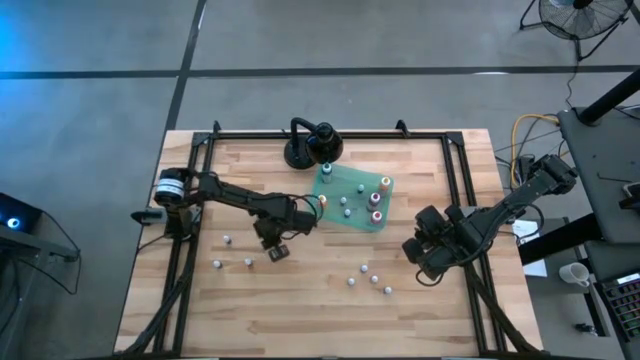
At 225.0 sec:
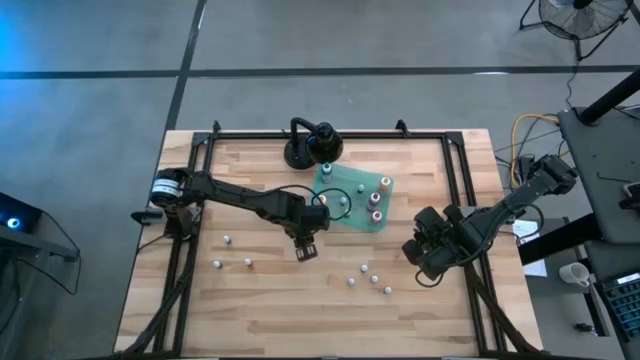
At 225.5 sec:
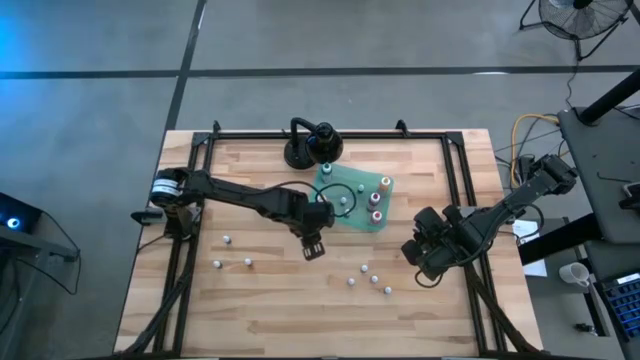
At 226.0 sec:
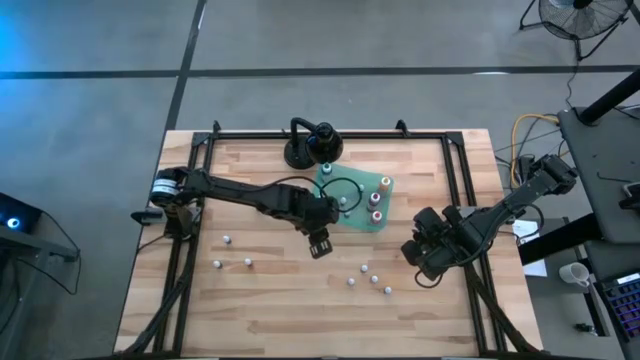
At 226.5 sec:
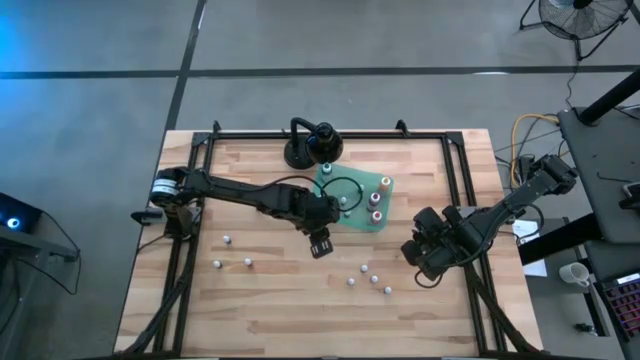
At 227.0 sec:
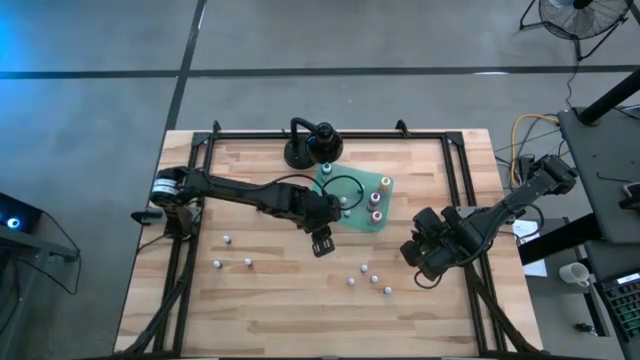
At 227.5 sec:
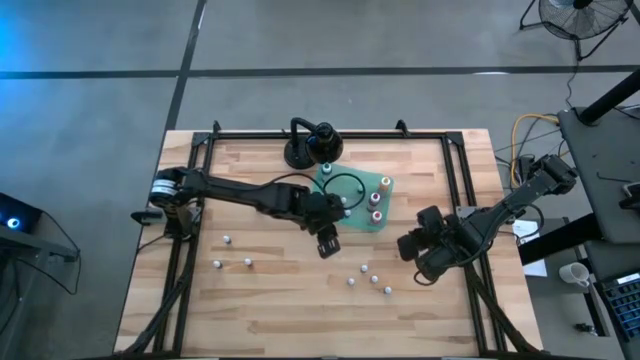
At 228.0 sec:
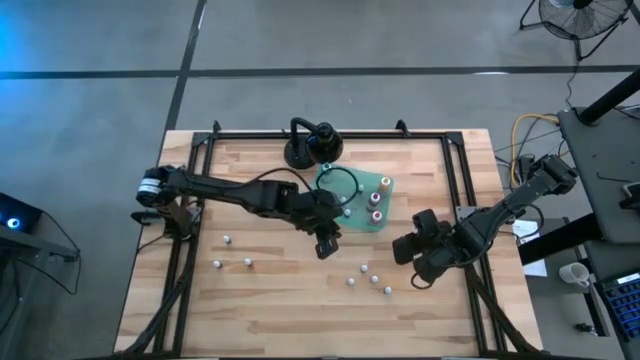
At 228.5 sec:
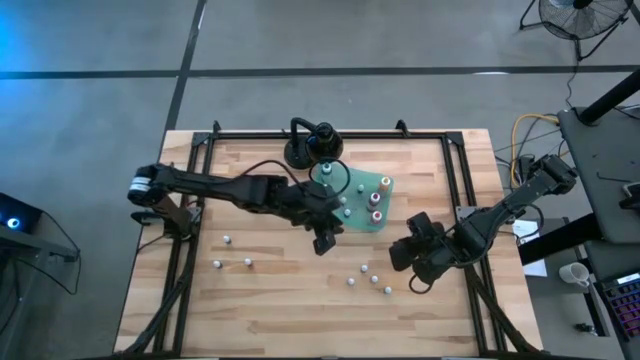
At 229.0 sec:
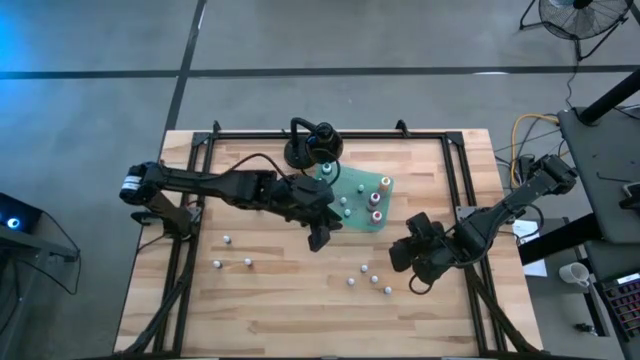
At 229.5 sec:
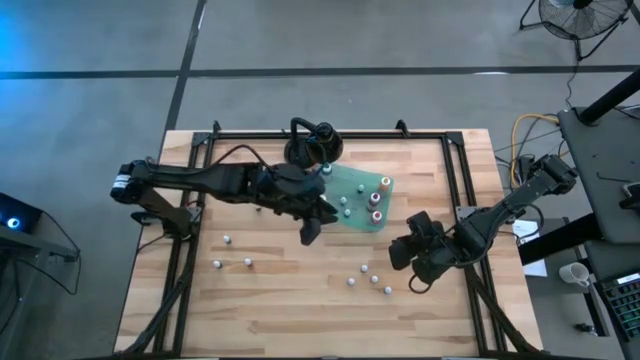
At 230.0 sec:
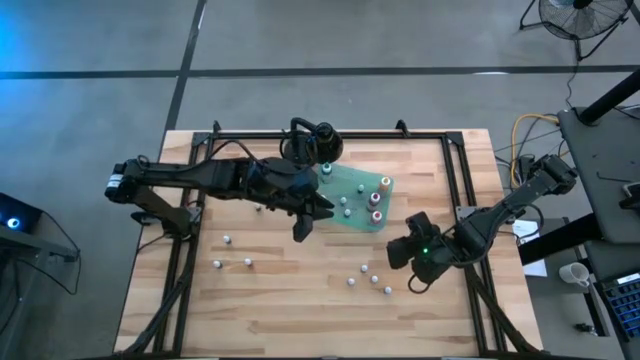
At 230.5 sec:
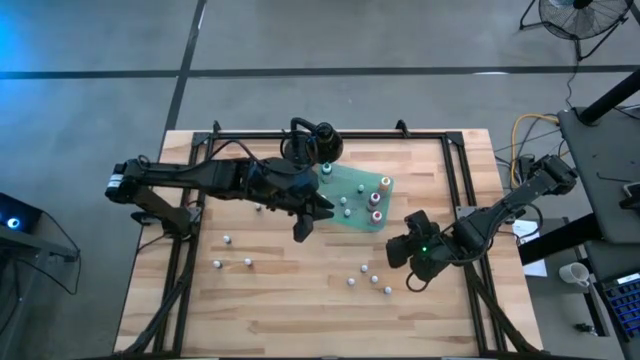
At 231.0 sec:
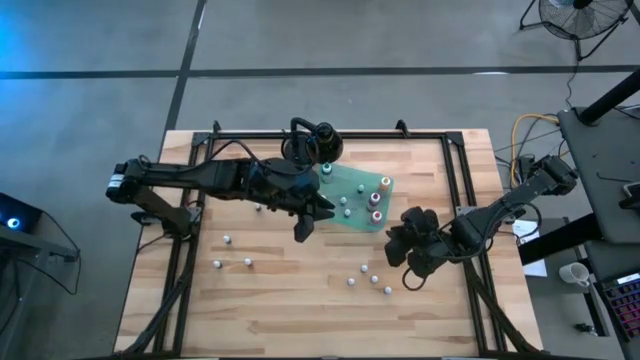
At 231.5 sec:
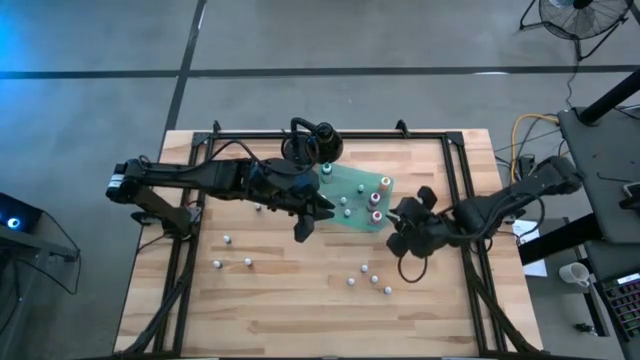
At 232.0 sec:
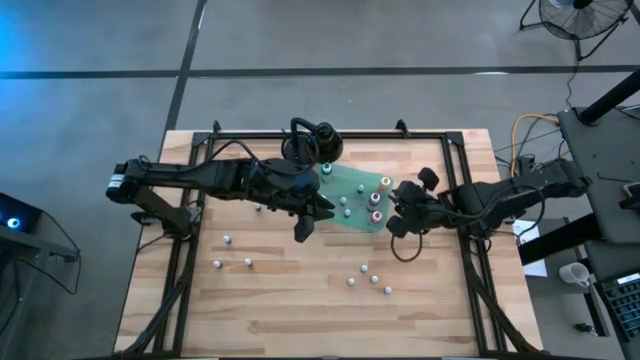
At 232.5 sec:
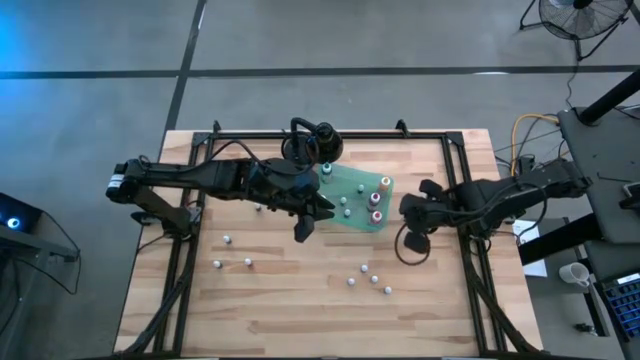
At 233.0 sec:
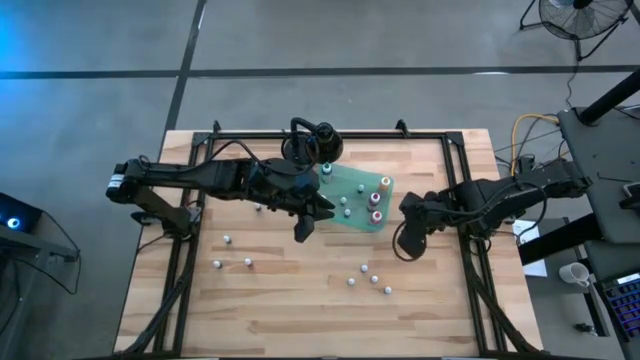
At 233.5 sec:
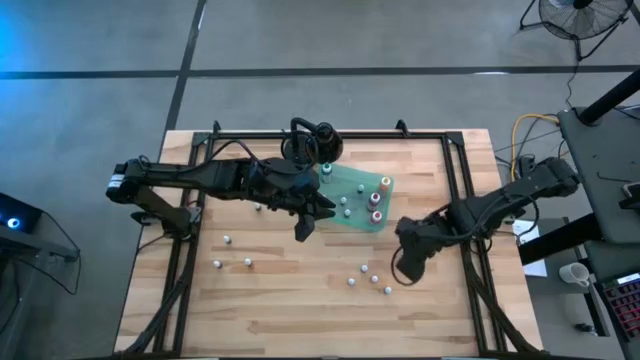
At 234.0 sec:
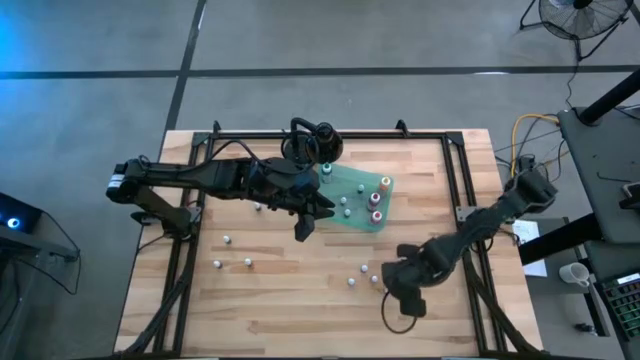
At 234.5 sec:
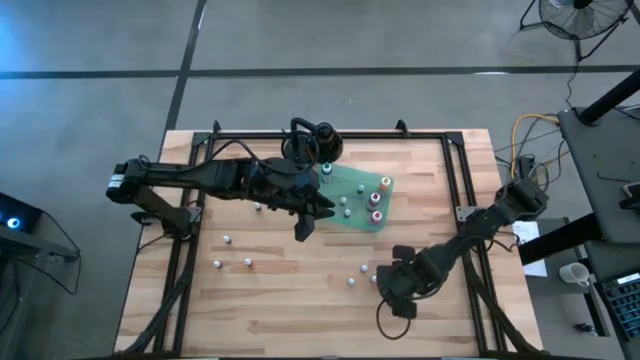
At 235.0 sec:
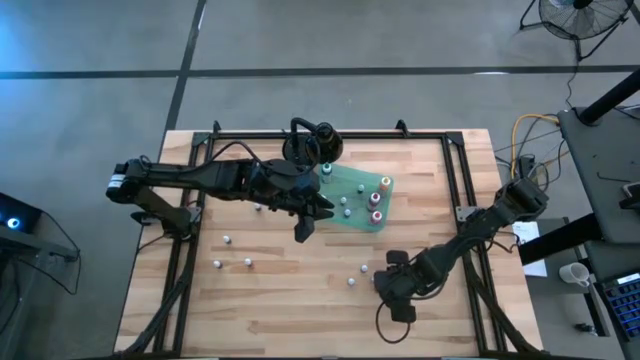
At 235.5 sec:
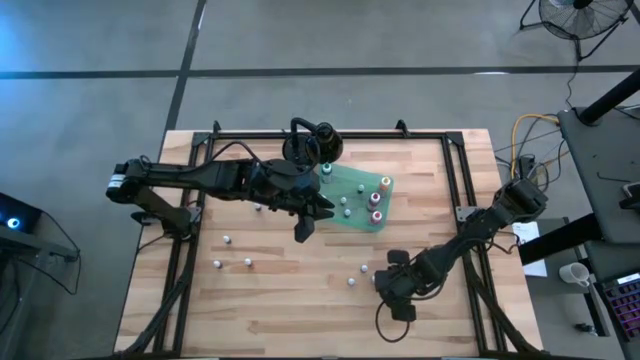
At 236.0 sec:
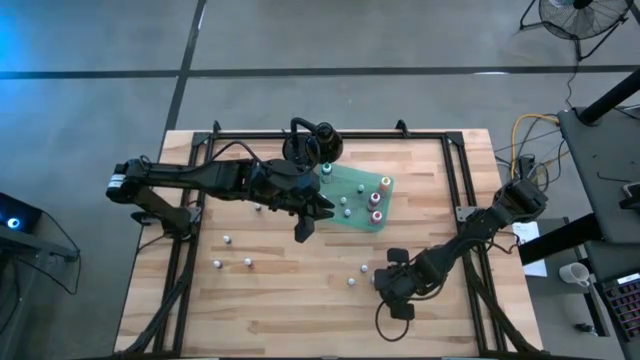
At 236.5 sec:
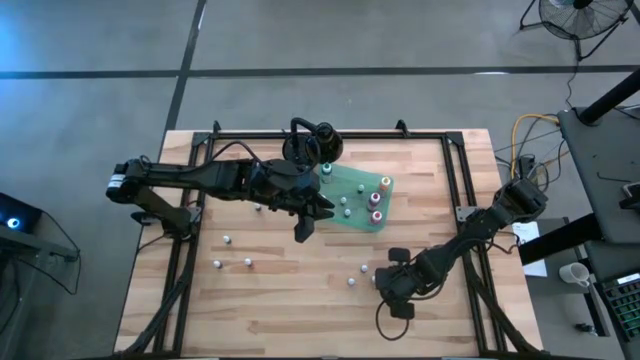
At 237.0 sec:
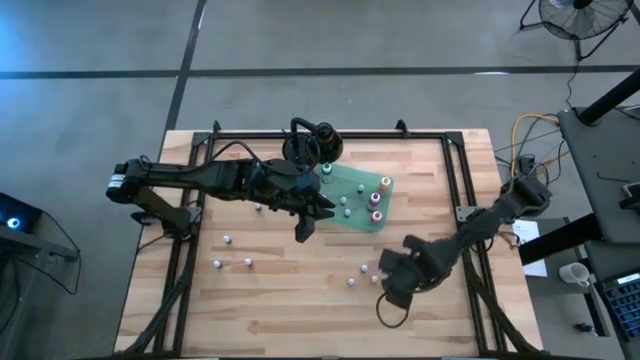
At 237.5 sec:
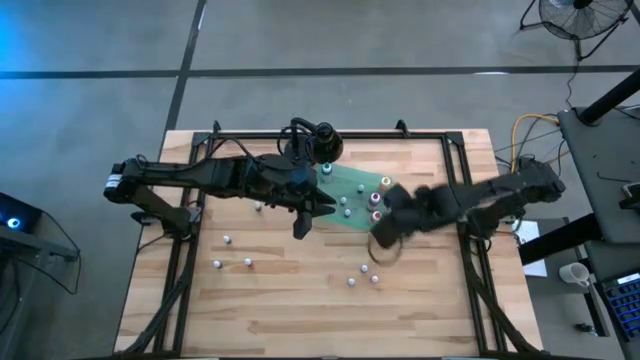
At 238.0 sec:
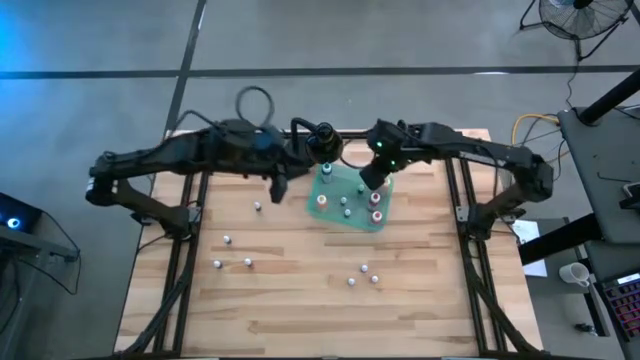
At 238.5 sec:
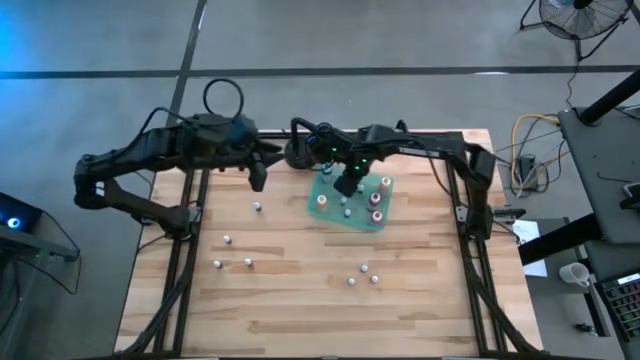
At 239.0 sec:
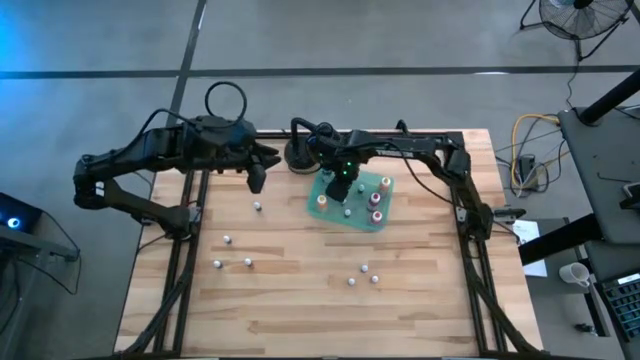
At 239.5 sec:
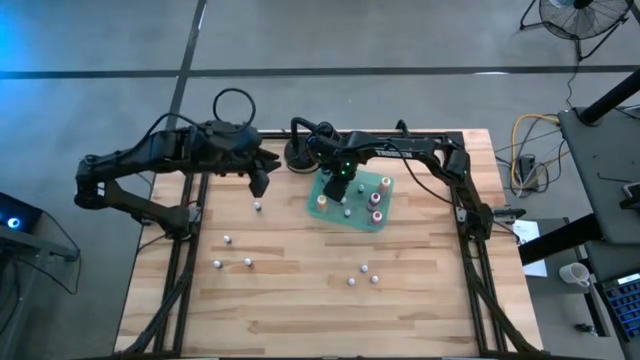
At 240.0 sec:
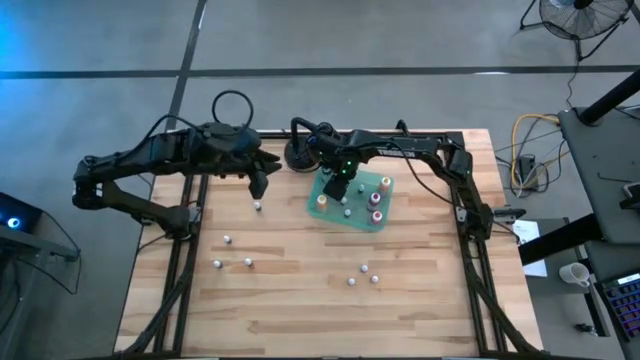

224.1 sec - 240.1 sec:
Task: Pick & Place food coloring
Put the blue food coloring bottle into the green bin

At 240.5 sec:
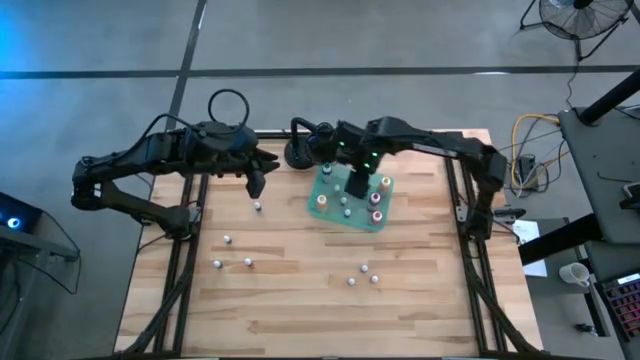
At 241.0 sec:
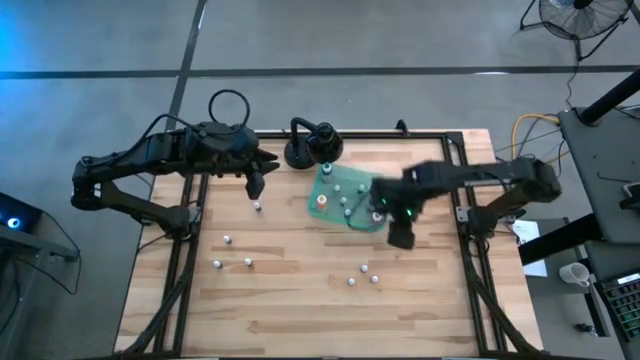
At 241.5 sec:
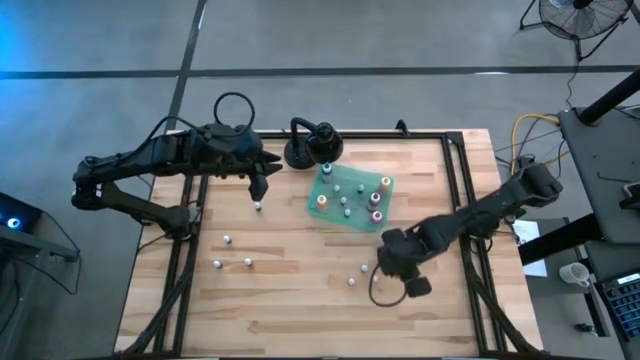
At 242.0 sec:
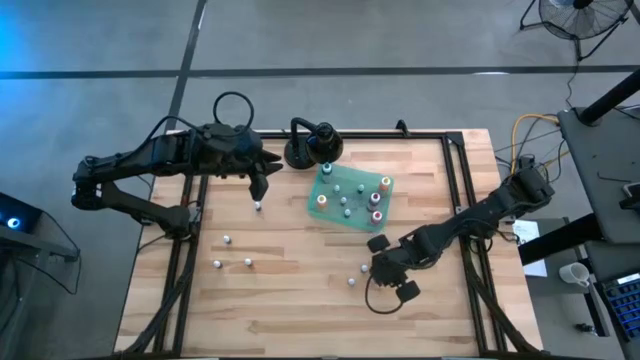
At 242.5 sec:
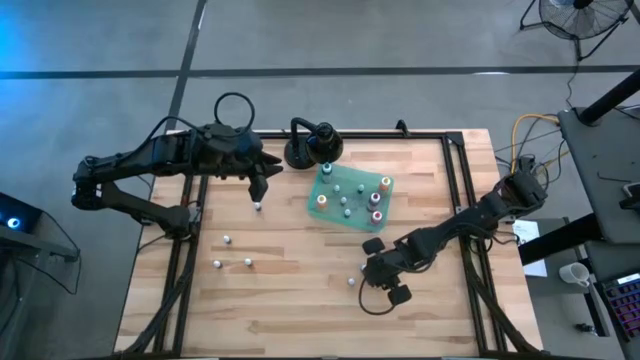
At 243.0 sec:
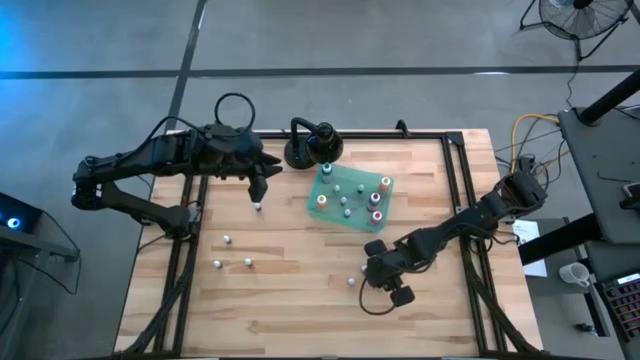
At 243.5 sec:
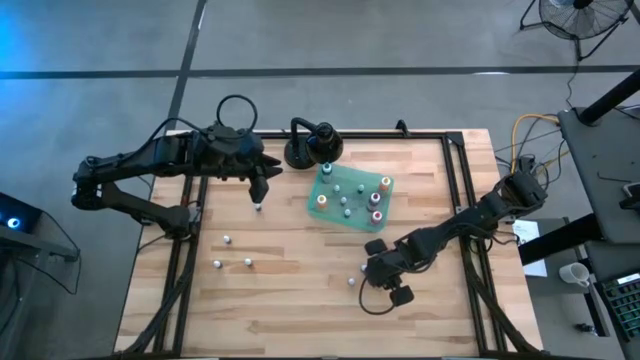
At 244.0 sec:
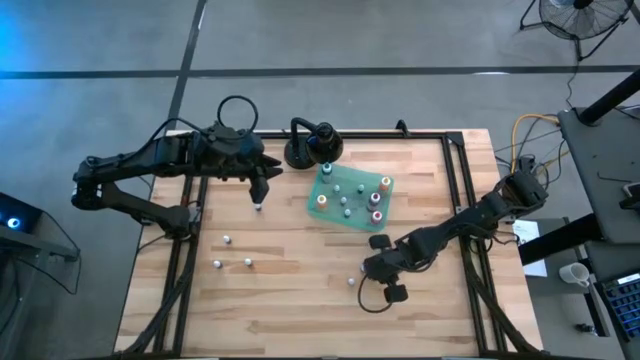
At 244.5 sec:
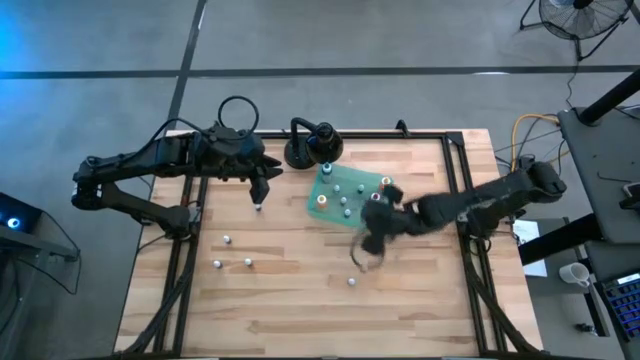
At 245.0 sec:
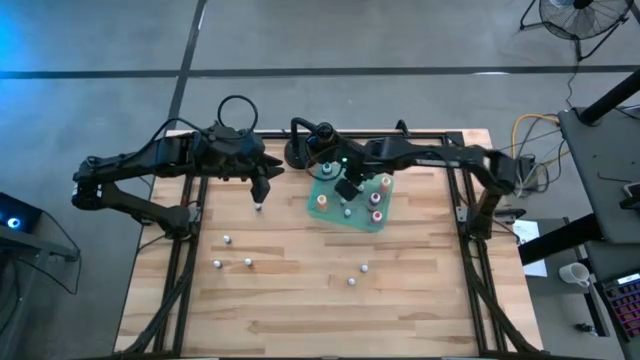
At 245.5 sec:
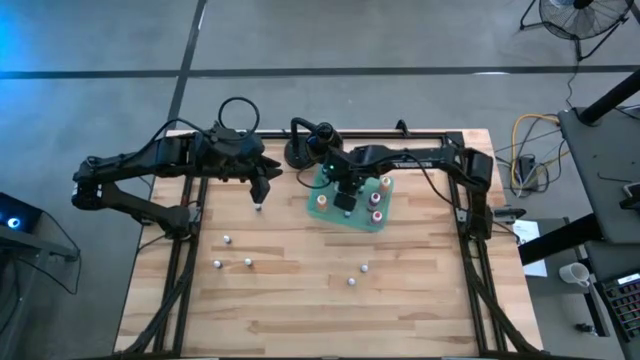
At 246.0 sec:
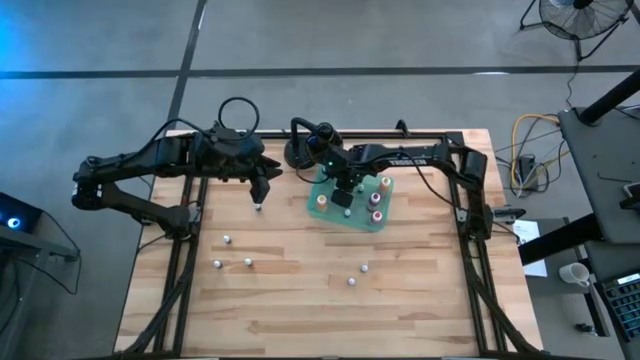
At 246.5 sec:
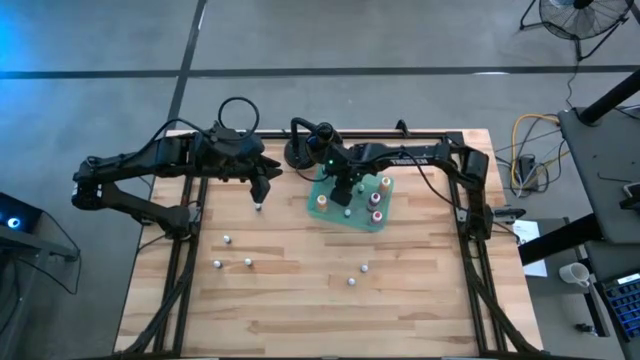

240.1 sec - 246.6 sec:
Put the orange food coloring bottle into the green bin
